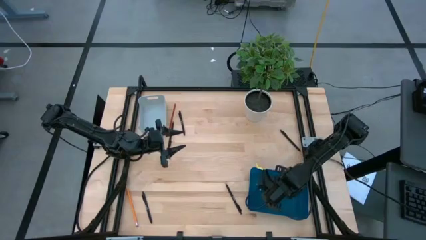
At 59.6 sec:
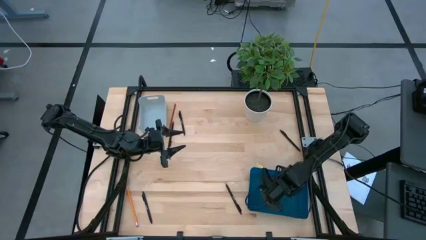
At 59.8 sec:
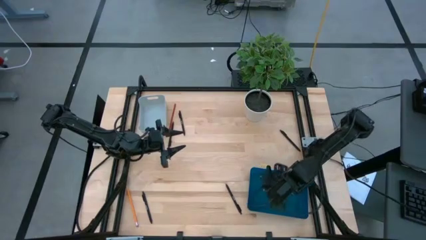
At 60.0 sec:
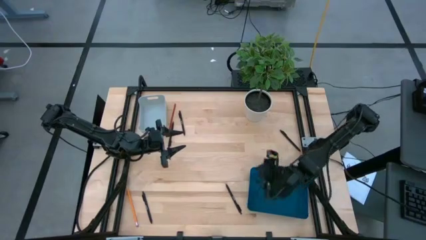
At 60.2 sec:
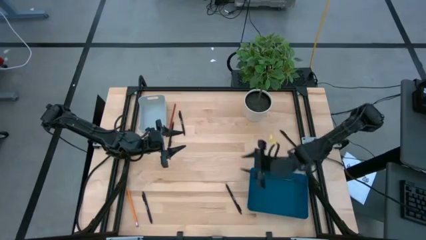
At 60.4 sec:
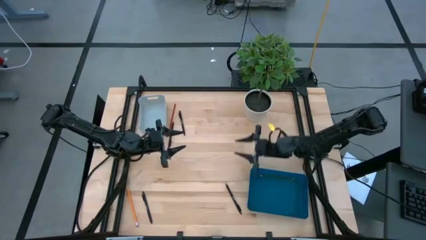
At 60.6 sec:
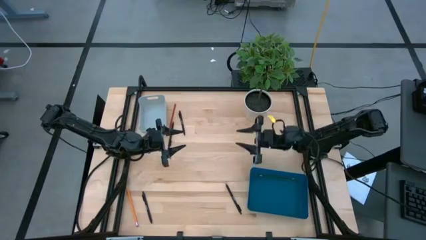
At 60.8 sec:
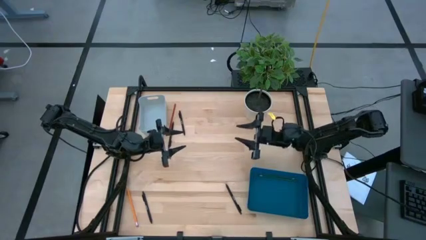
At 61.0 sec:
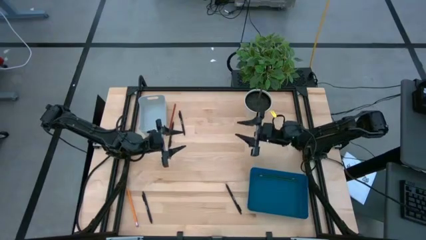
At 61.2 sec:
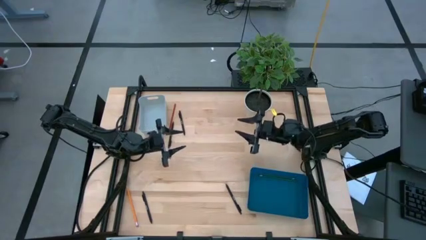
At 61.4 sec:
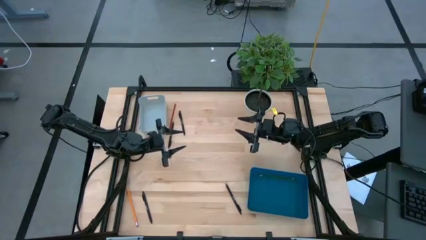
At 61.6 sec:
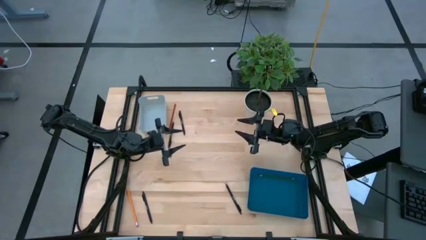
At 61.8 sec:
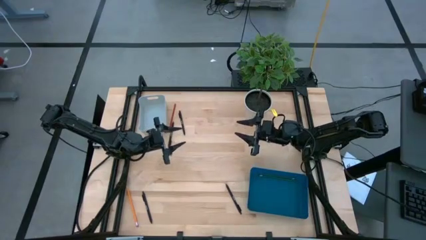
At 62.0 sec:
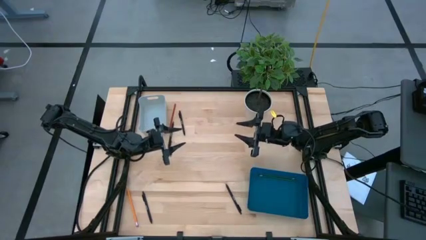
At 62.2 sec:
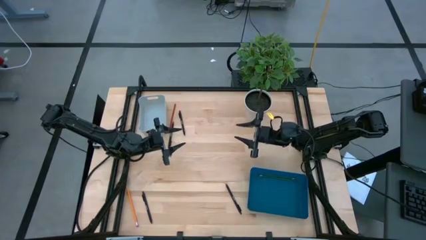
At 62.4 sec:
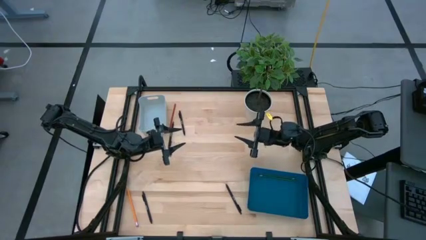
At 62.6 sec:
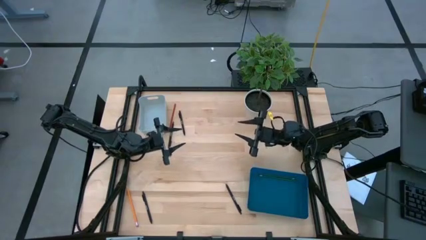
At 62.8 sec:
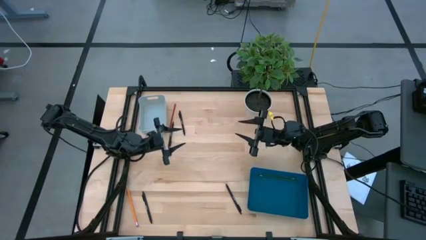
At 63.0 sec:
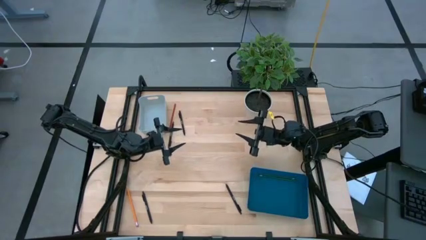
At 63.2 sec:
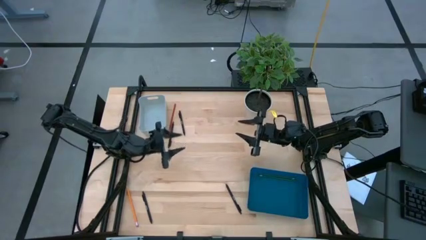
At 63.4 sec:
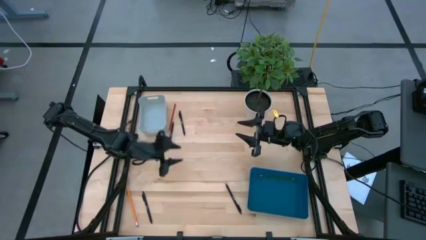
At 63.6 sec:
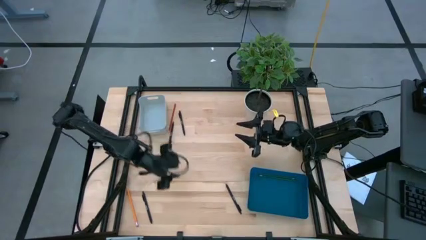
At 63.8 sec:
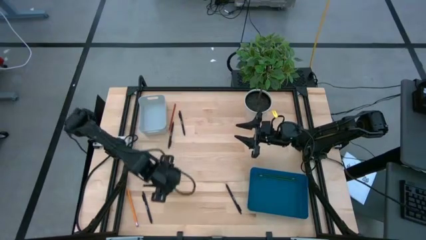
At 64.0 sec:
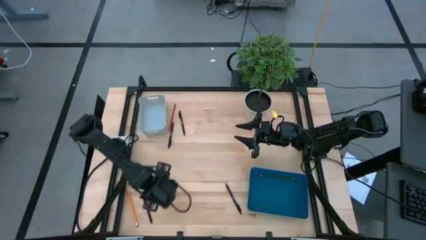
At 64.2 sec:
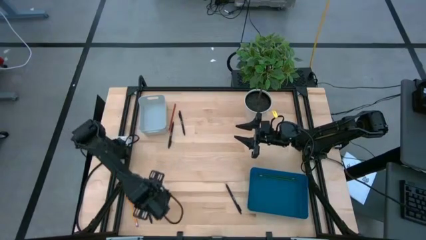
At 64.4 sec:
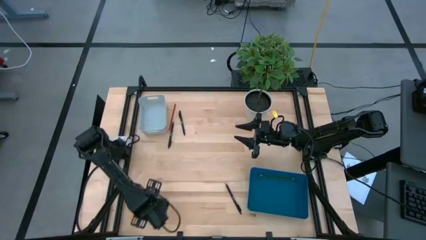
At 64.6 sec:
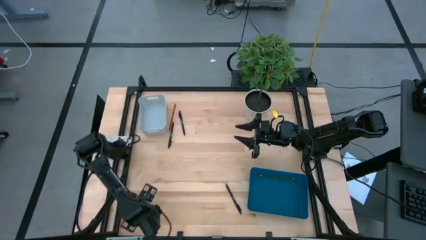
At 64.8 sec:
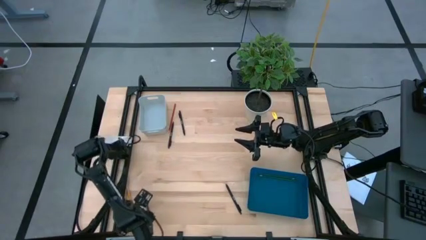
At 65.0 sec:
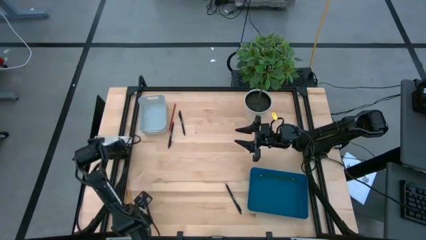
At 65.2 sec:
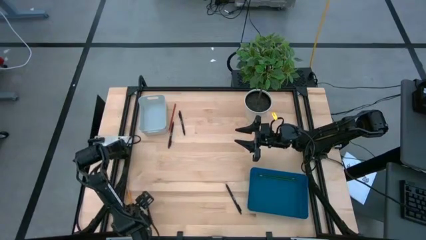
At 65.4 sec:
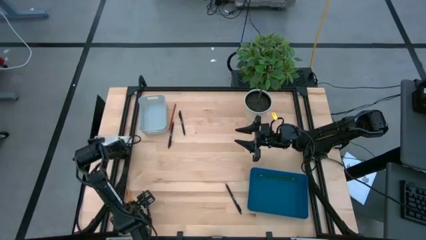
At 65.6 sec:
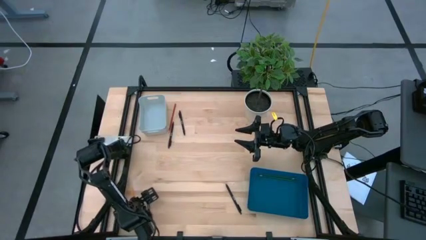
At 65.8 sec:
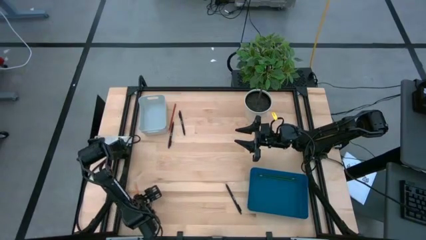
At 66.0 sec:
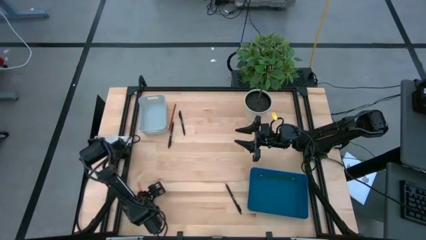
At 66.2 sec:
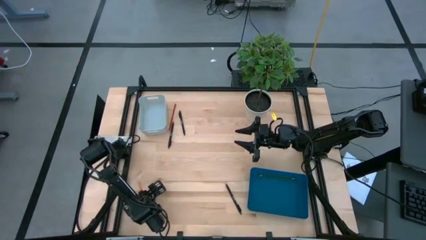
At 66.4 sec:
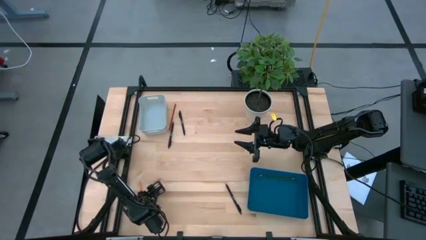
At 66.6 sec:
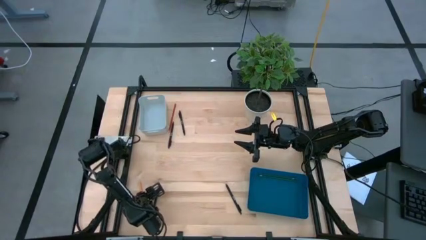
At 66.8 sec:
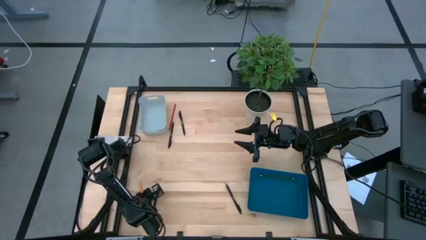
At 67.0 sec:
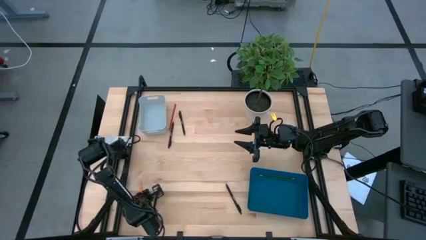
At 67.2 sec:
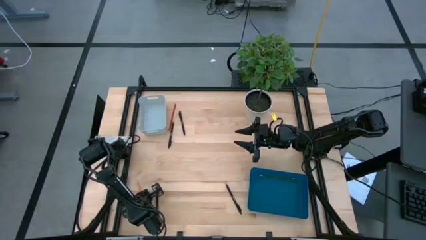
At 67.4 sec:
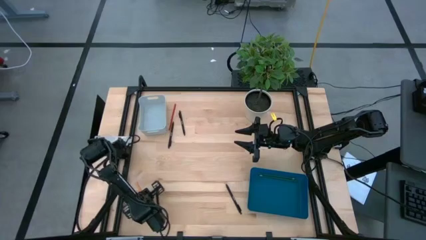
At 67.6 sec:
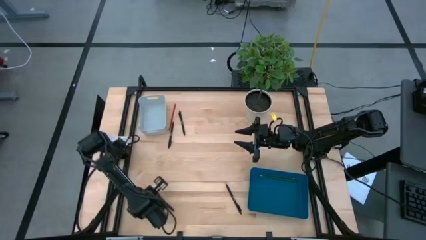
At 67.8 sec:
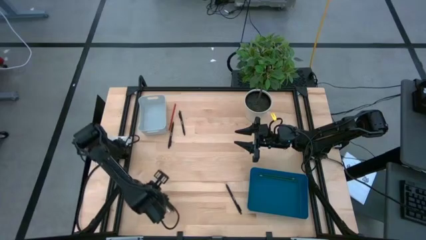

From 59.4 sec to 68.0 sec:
Task: Sort pens & pencils
Put the yellow pencil into the blue bin

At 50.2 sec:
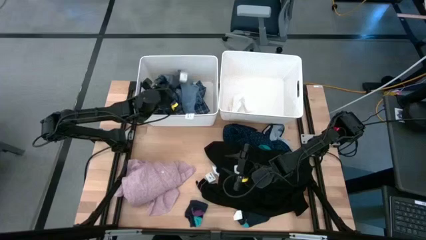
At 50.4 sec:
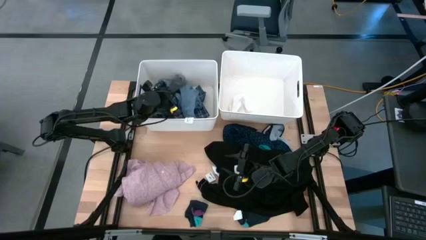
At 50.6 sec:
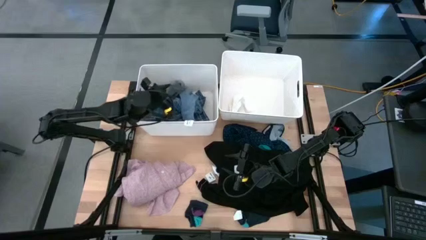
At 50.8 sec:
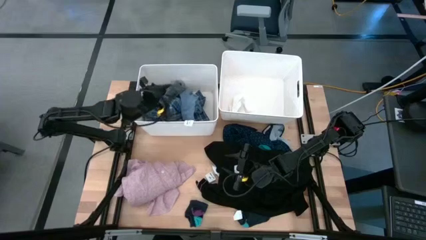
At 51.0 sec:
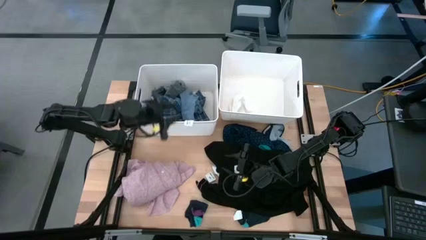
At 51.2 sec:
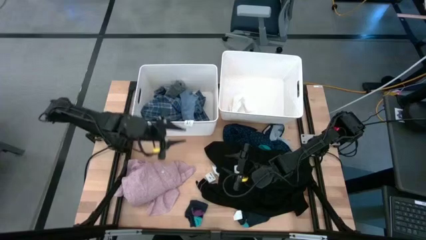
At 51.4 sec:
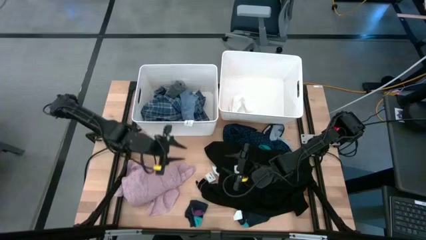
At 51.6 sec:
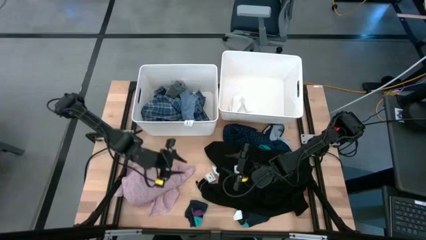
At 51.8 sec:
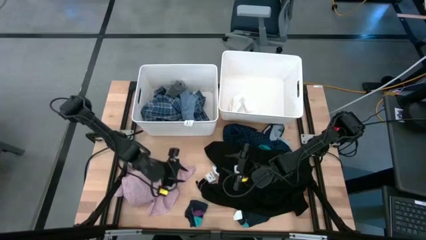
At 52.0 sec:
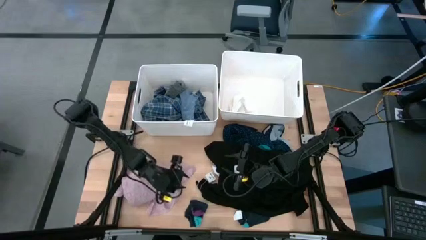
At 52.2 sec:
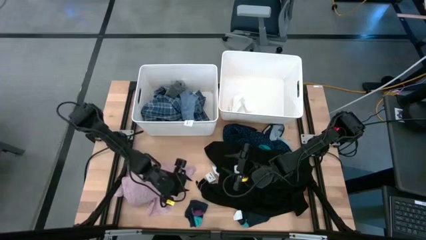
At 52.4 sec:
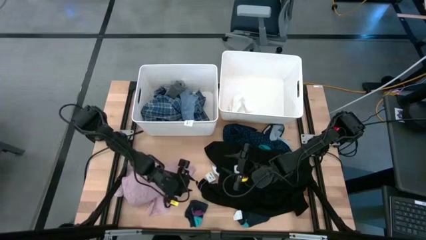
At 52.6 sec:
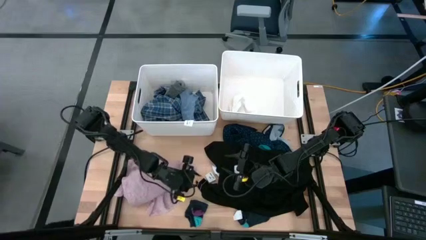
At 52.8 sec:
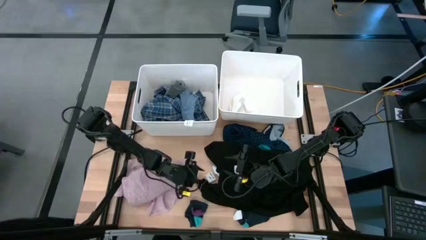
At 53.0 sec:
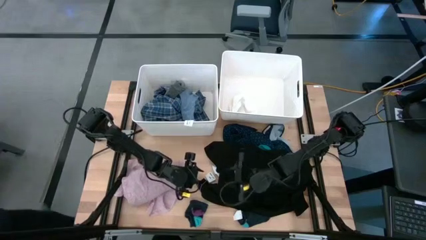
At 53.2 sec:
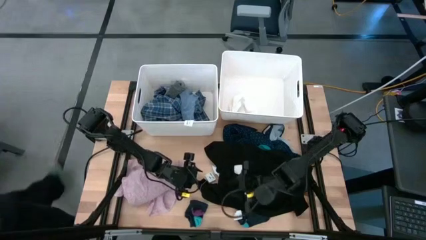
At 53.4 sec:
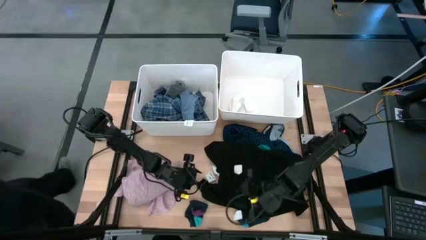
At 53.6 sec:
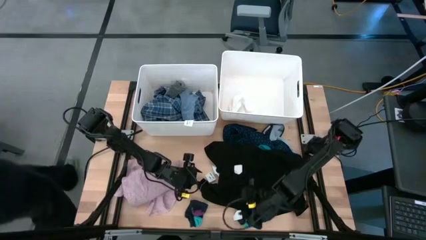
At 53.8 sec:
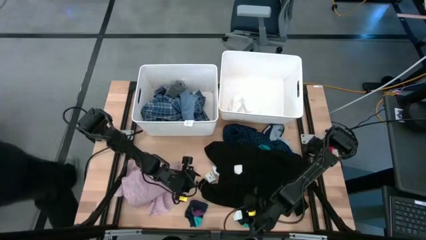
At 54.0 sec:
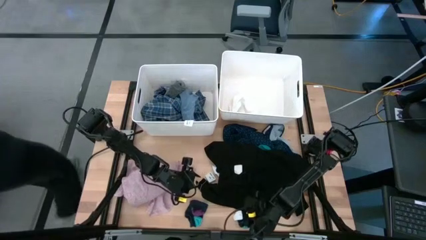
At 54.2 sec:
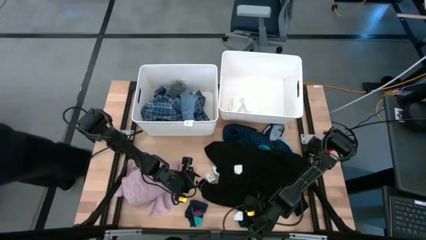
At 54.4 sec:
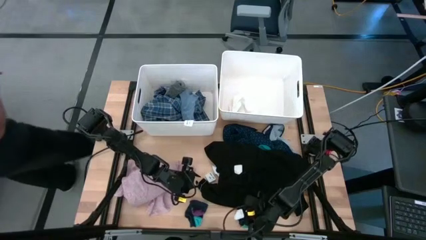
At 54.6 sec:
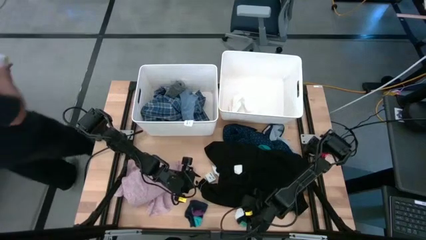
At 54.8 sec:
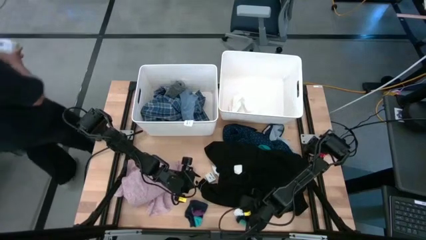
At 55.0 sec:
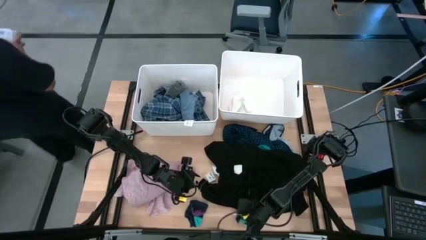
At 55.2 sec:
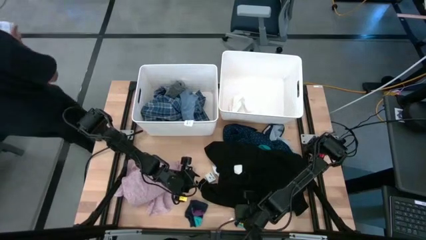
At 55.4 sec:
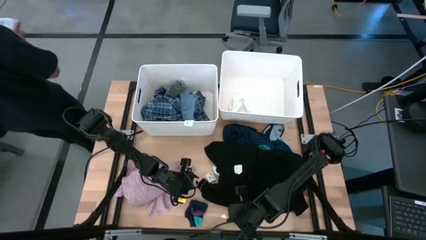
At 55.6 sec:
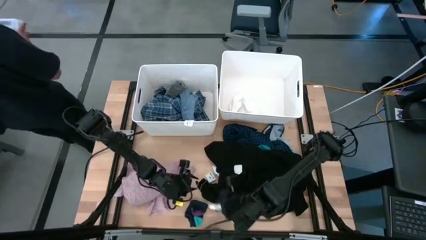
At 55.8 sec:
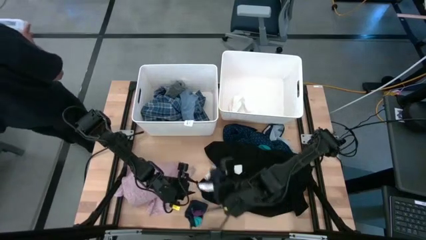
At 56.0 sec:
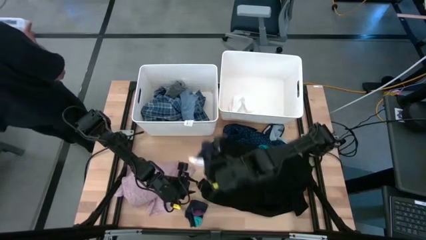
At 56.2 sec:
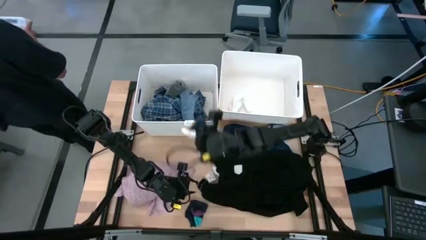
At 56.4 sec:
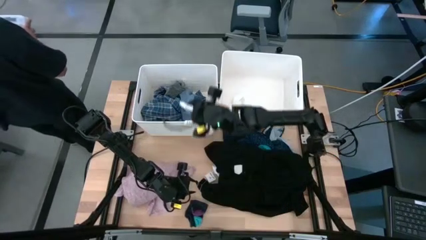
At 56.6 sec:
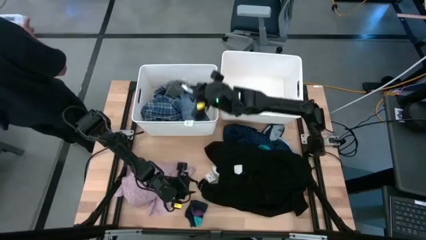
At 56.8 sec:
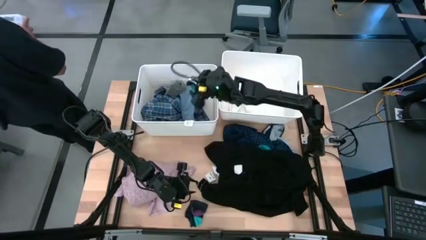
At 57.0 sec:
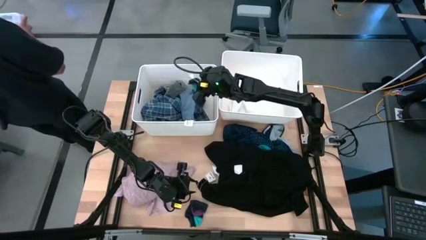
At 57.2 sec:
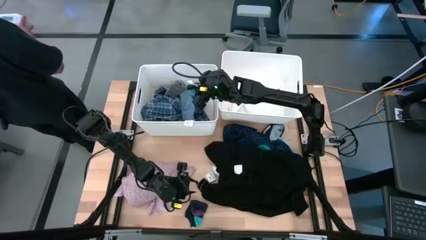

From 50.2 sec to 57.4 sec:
Task: Sort clothes
Put the right dark blue sock into the left white bin
